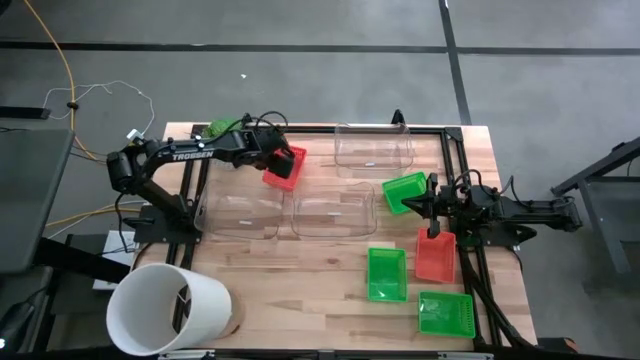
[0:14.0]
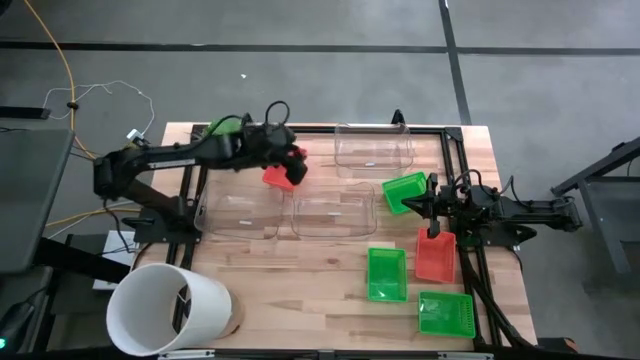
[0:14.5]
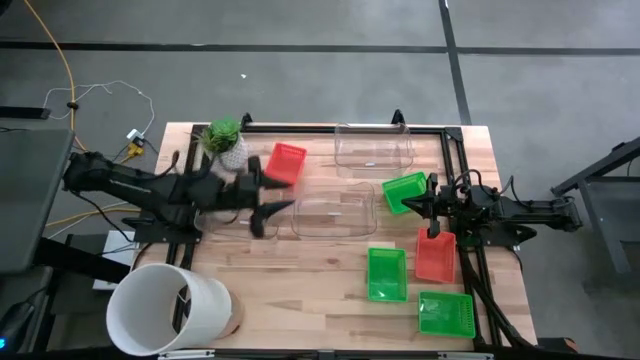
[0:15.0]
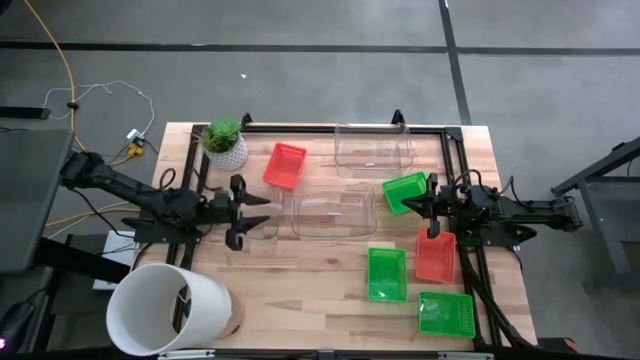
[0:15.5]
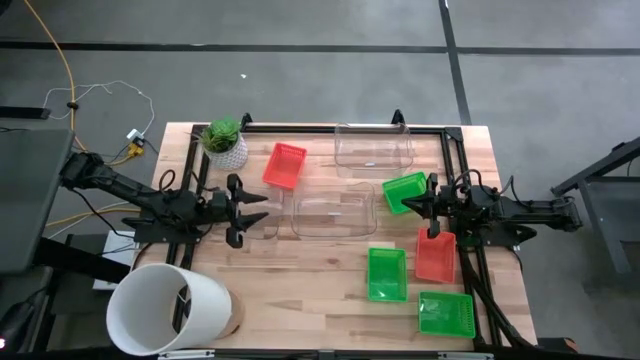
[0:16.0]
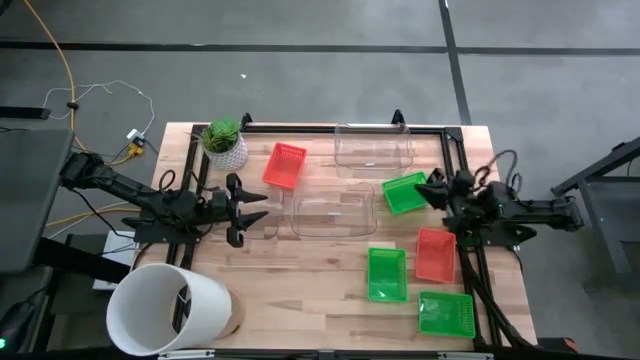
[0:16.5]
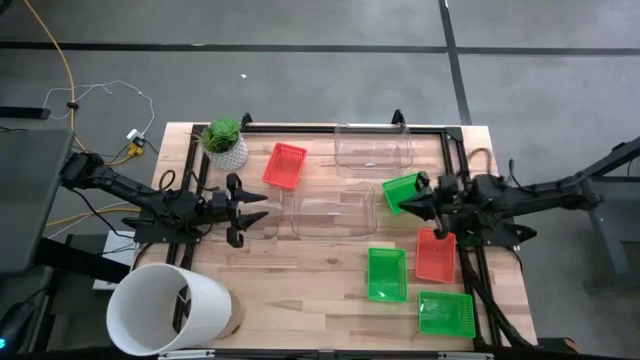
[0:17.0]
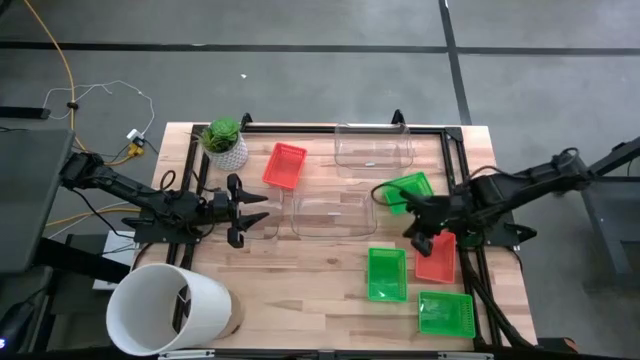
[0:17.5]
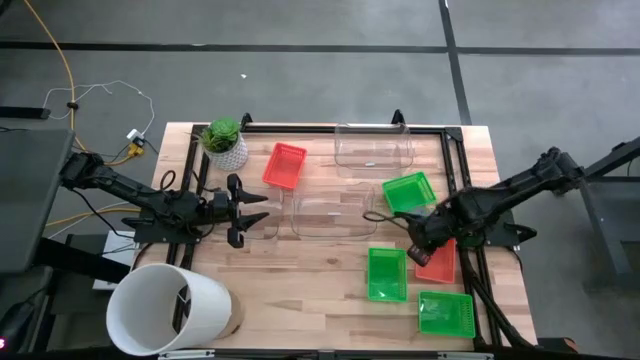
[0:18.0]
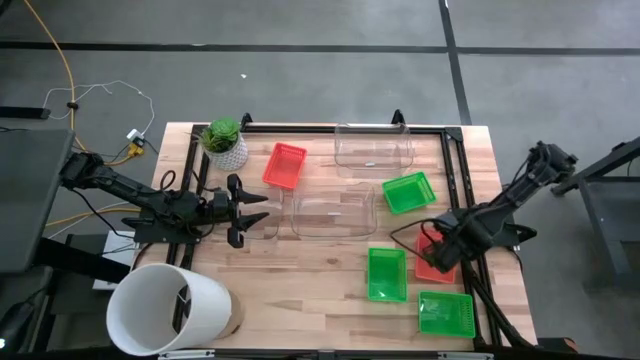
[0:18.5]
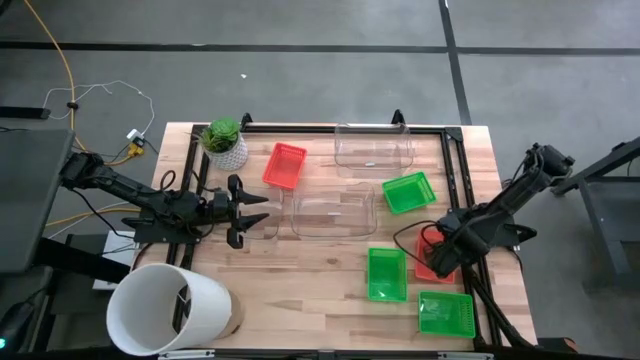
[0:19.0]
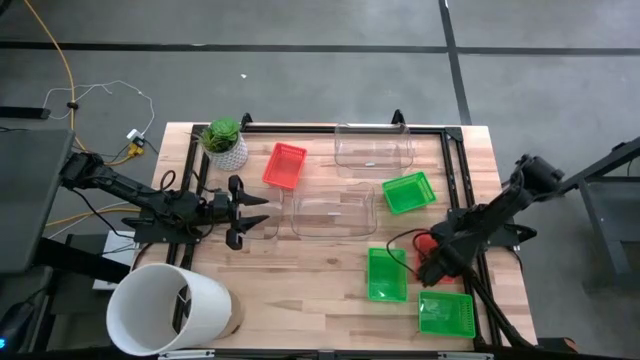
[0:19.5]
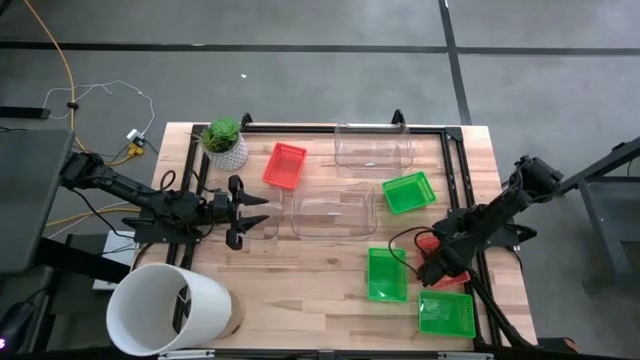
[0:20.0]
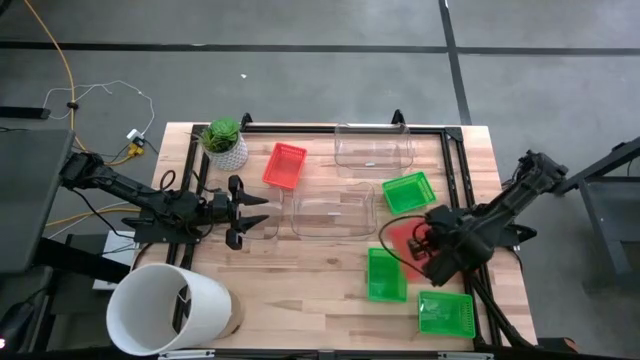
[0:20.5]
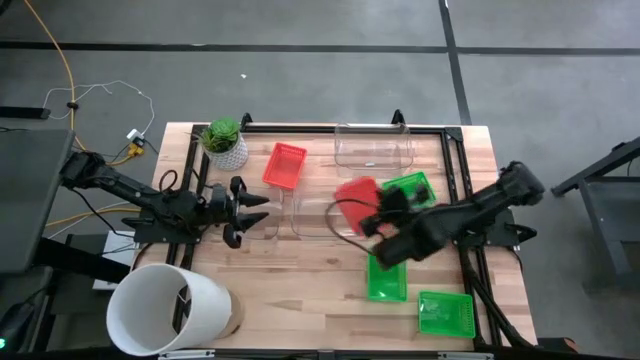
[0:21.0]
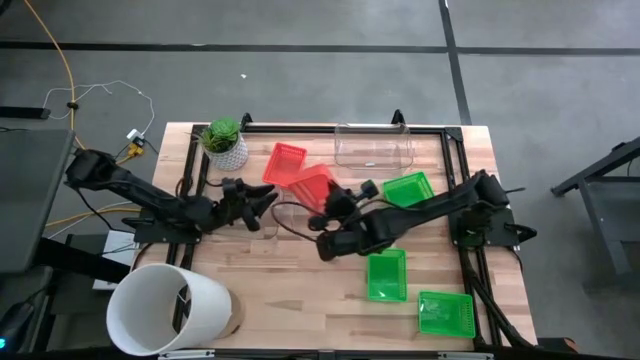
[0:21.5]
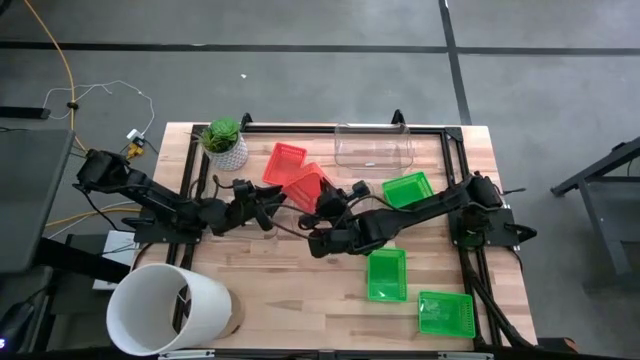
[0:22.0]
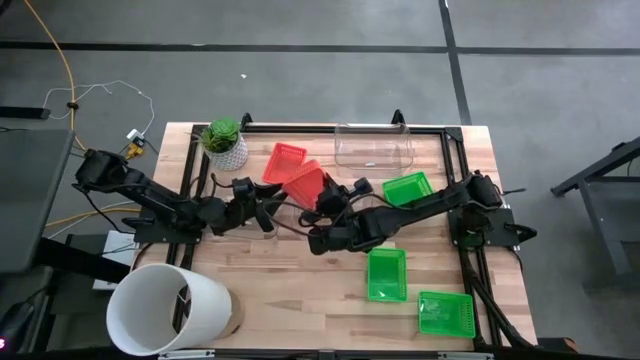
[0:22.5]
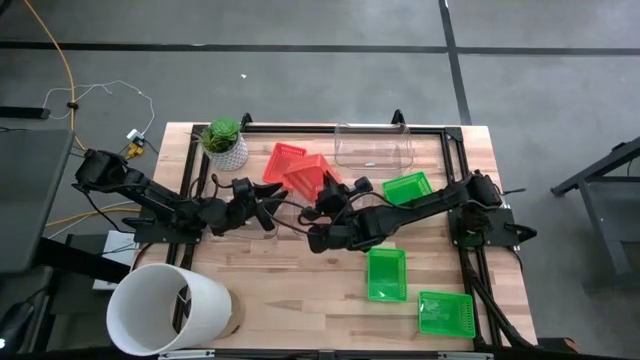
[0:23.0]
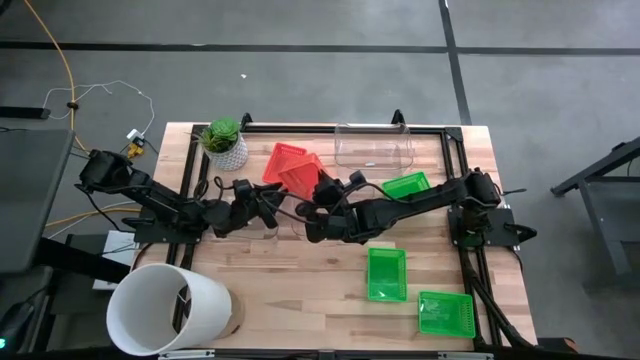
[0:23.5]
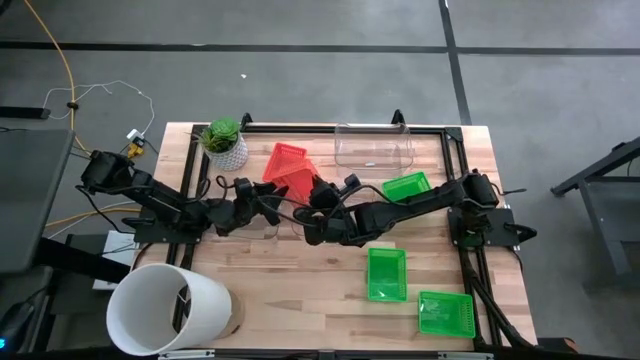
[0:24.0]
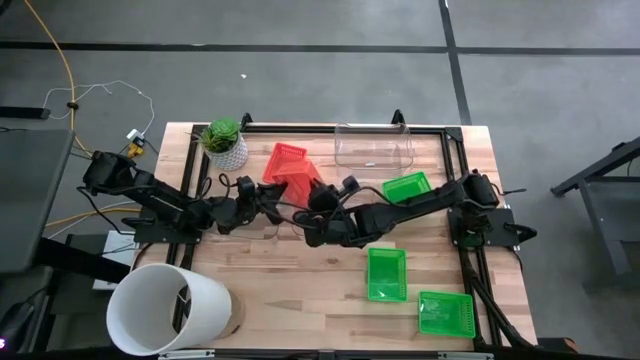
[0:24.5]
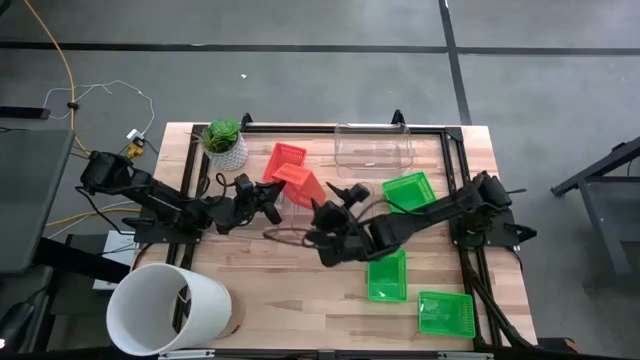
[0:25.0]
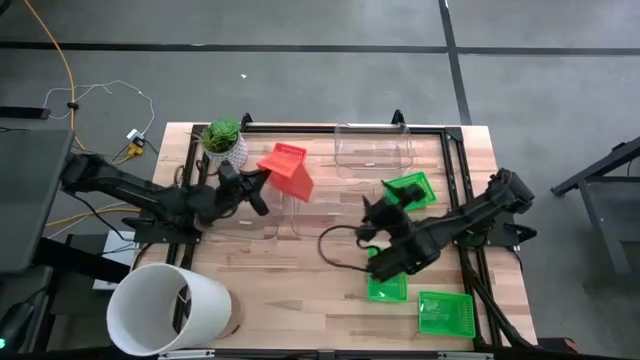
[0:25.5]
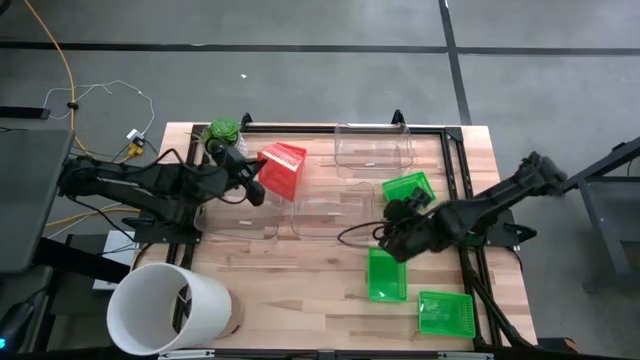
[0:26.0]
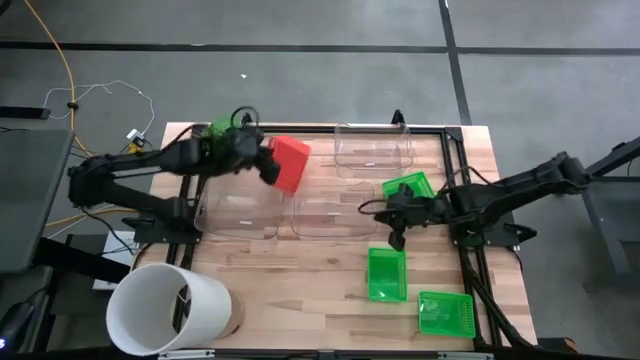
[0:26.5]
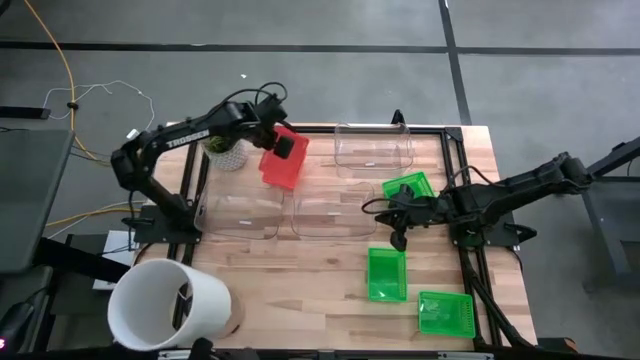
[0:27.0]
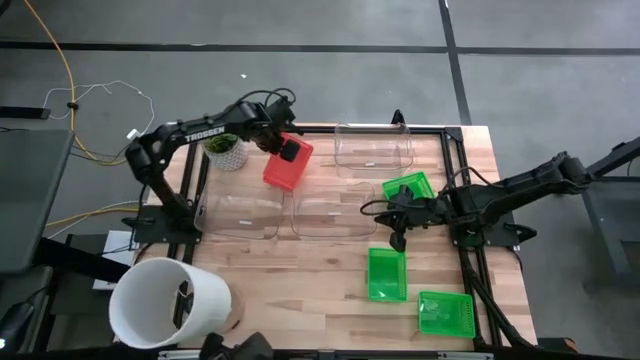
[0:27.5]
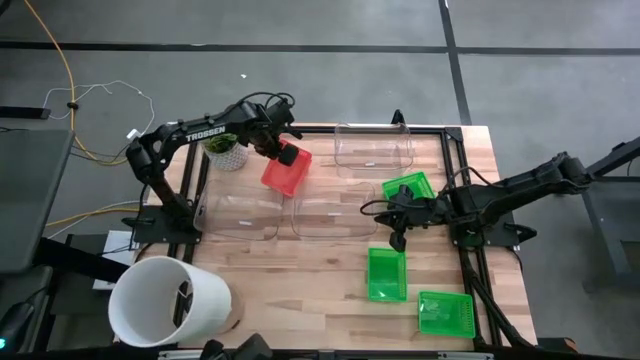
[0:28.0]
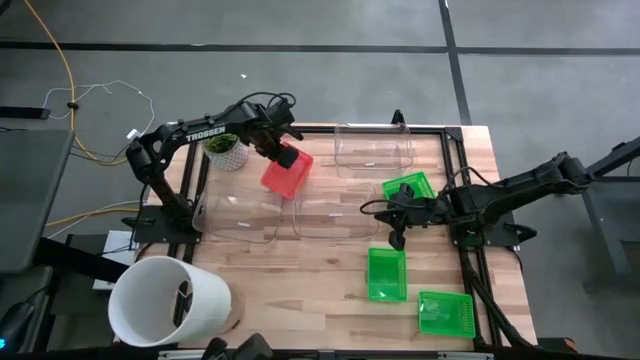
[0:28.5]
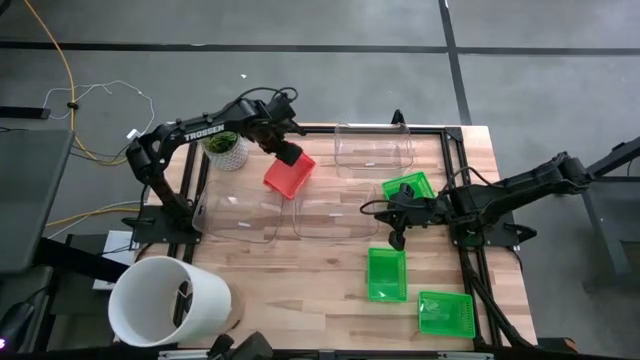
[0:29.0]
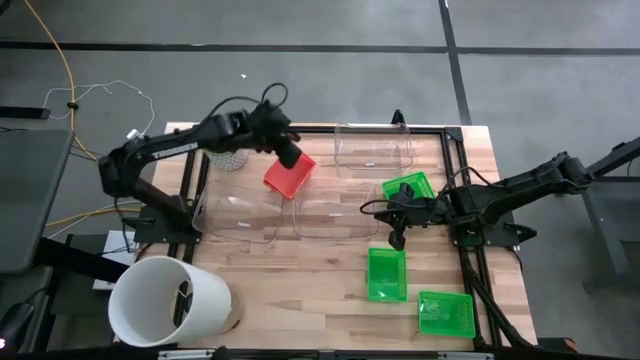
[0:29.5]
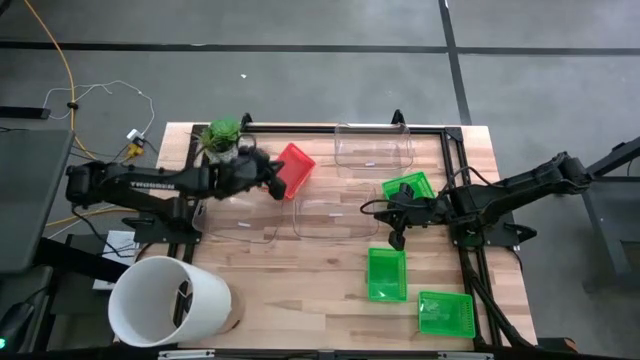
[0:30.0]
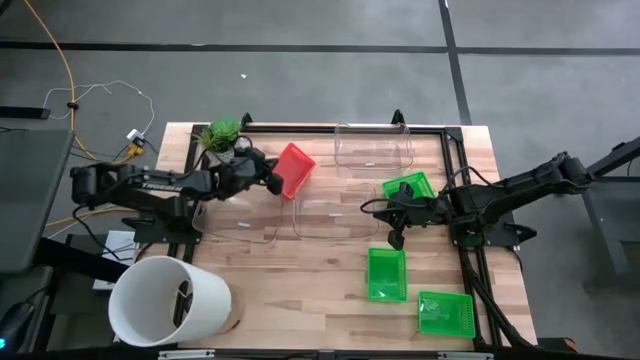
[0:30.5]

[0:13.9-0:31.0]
Stack the bottom orange bin on the top orange bins

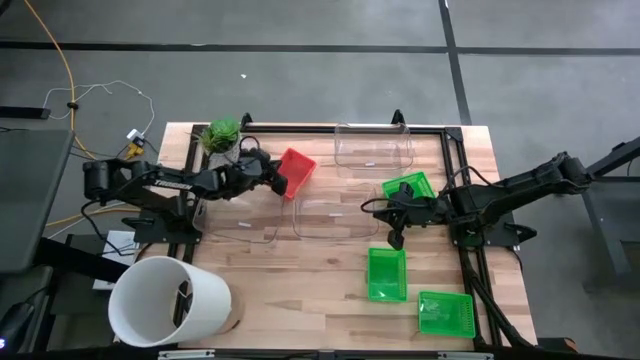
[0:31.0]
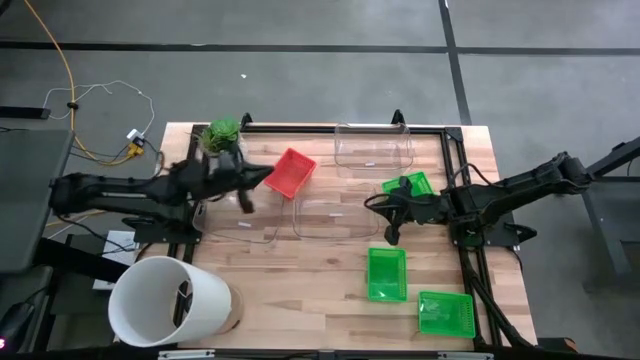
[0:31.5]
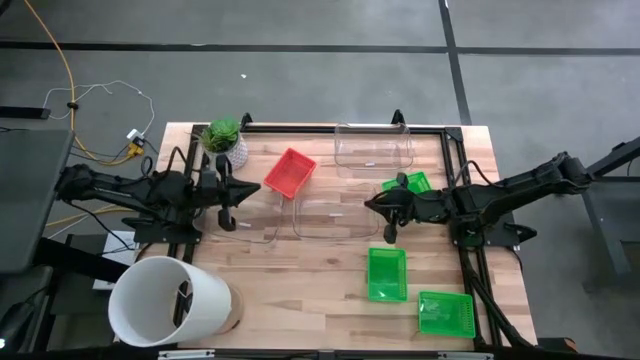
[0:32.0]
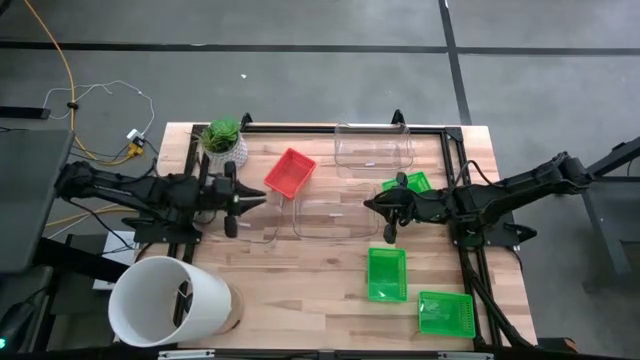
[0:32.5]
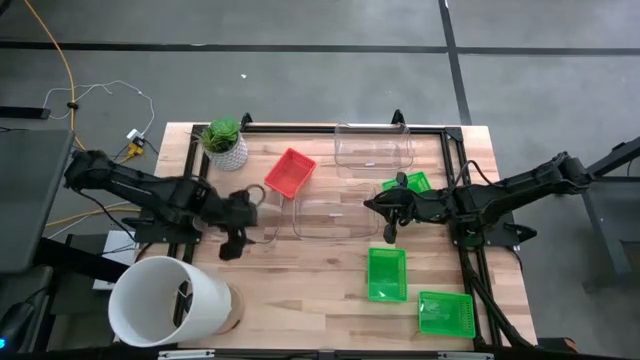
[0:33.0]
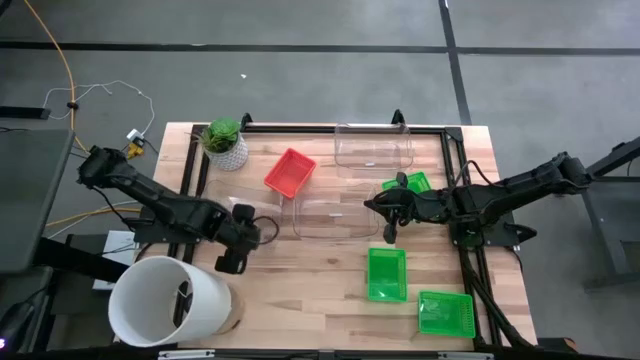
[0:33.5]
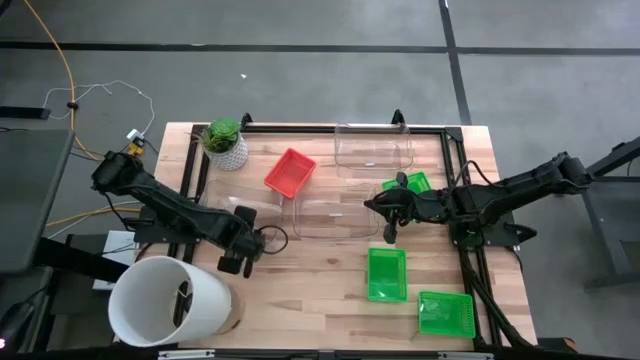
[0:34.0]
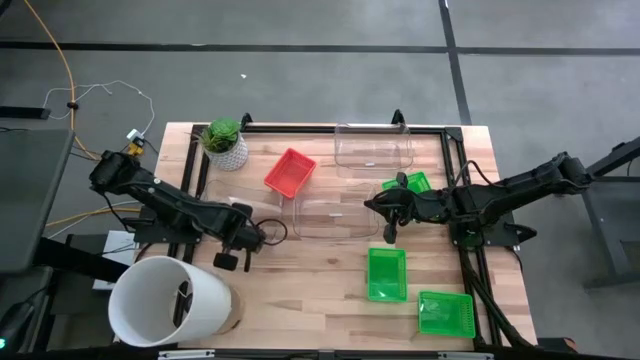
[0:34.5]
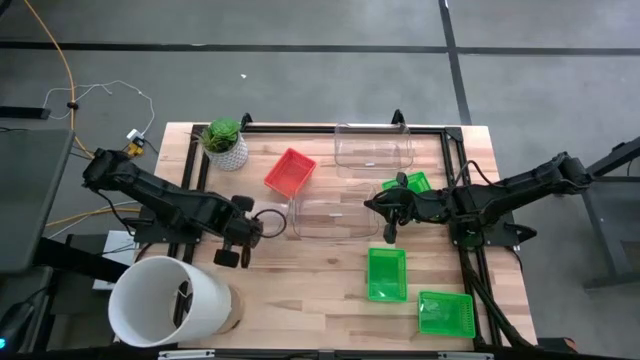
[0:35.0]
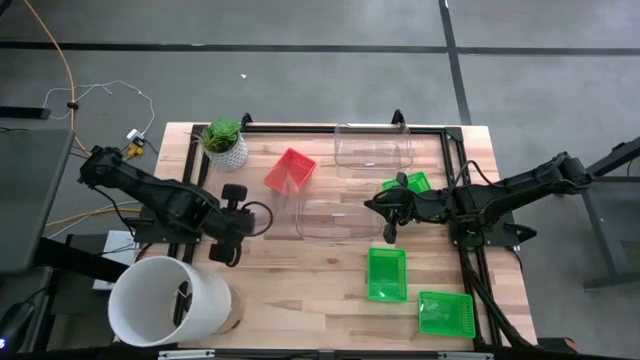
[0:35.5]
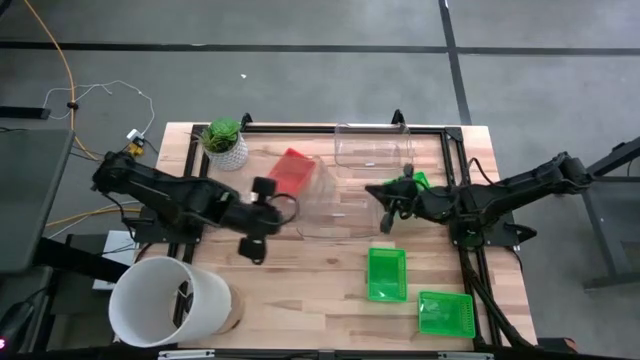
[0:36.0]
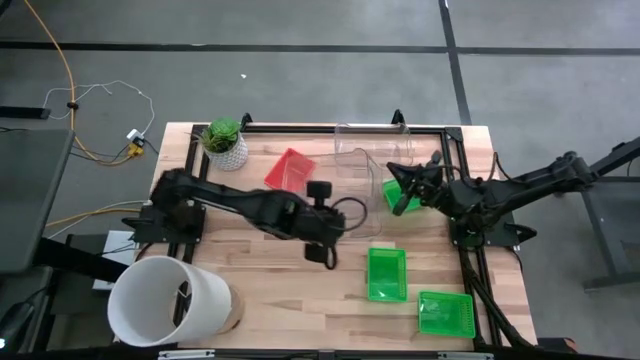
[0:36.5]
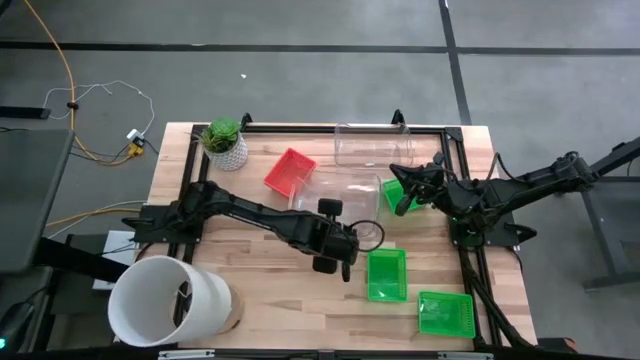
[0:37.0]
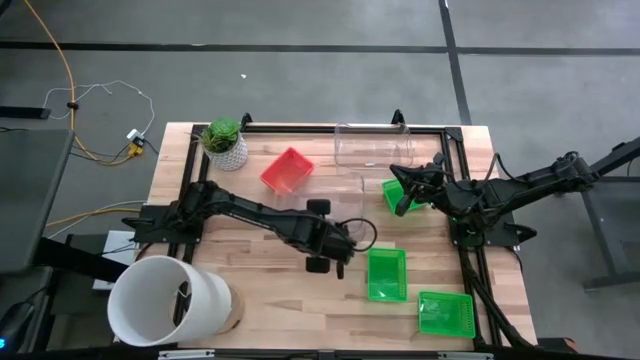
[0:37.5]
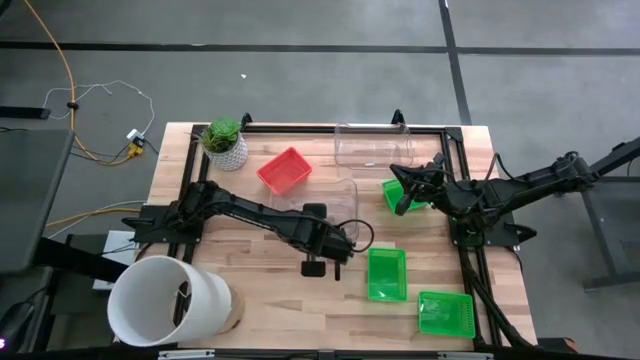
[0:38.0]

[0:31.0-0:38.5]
Stack the bottom left transparent bin on the bottom right transparent bin
